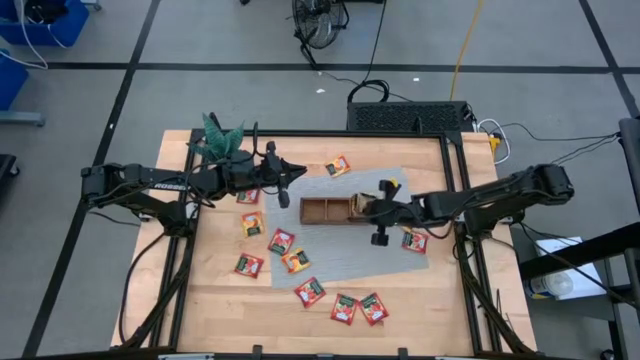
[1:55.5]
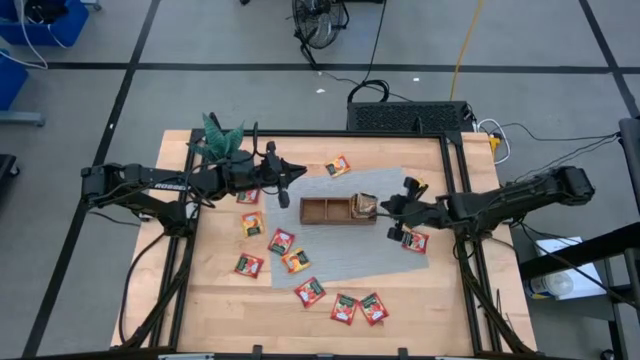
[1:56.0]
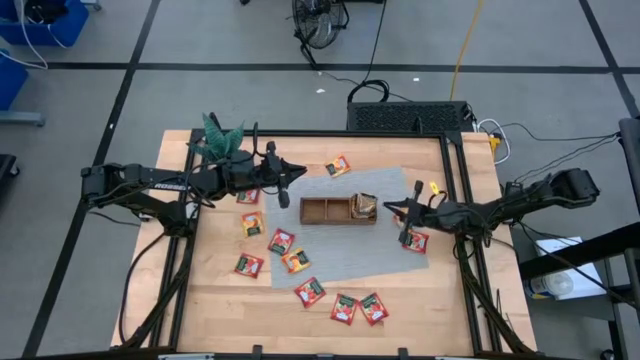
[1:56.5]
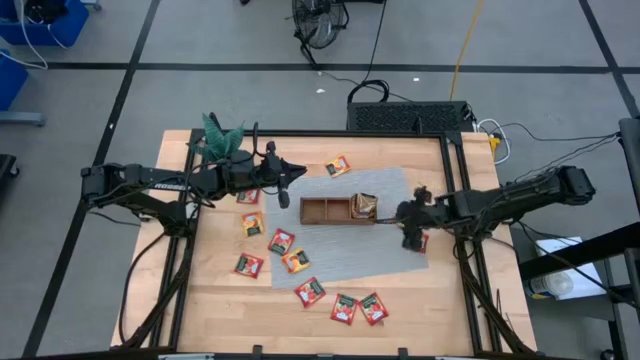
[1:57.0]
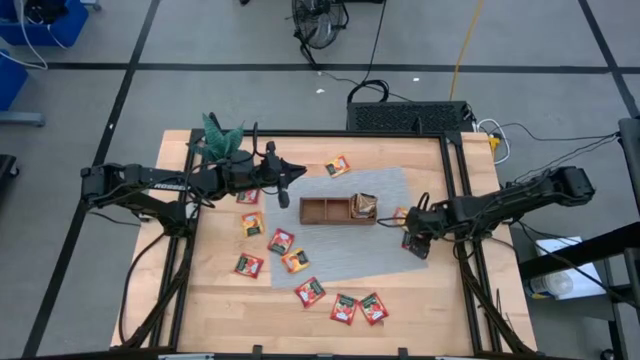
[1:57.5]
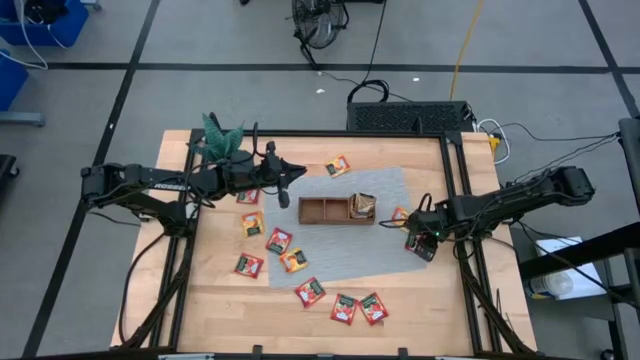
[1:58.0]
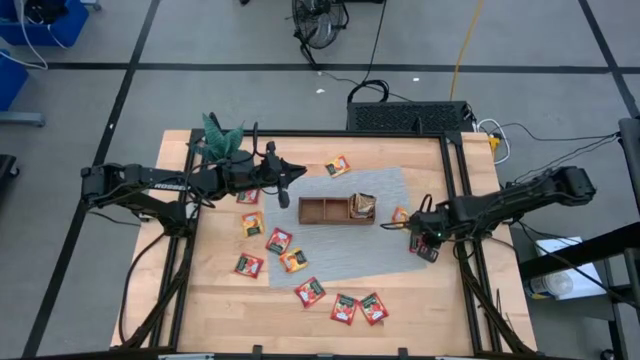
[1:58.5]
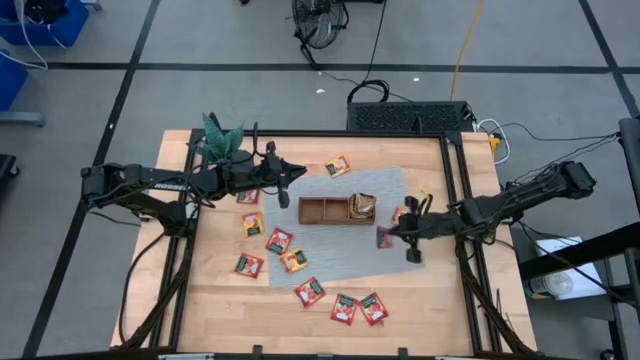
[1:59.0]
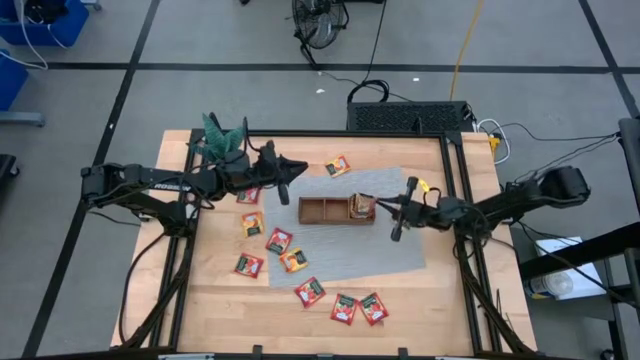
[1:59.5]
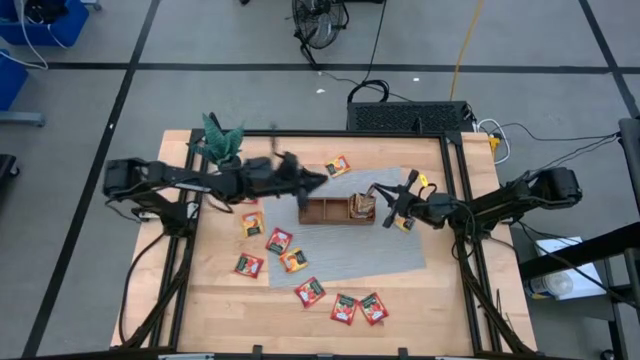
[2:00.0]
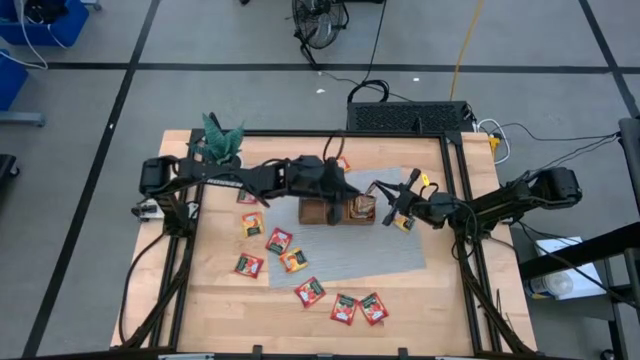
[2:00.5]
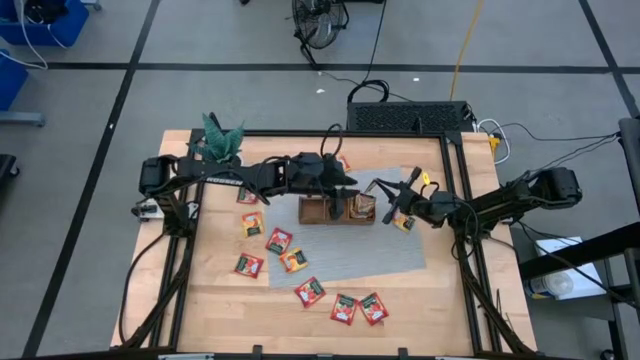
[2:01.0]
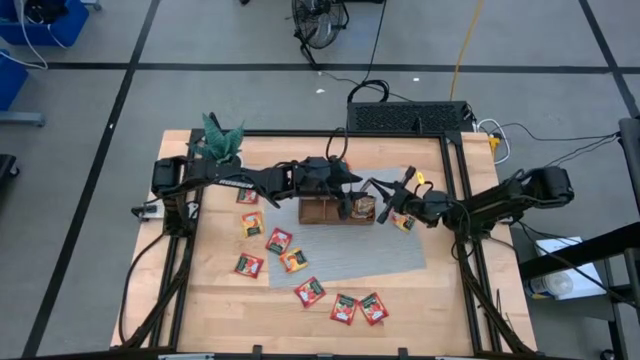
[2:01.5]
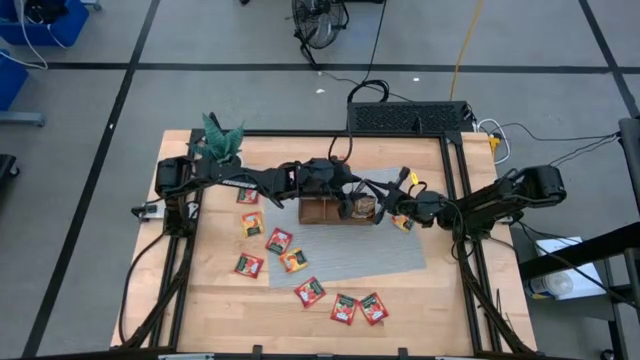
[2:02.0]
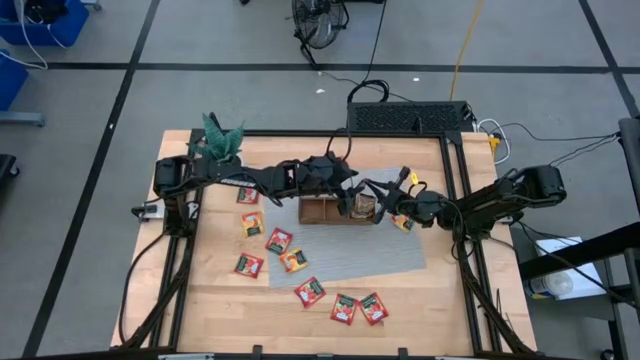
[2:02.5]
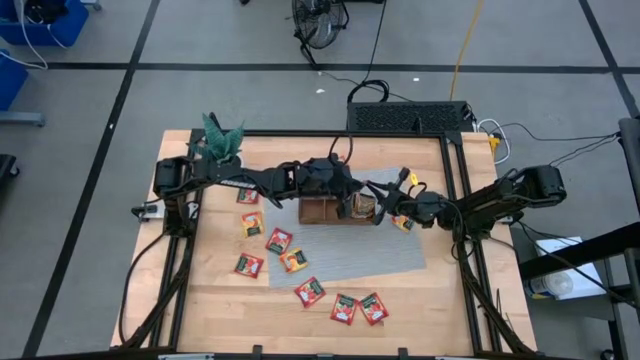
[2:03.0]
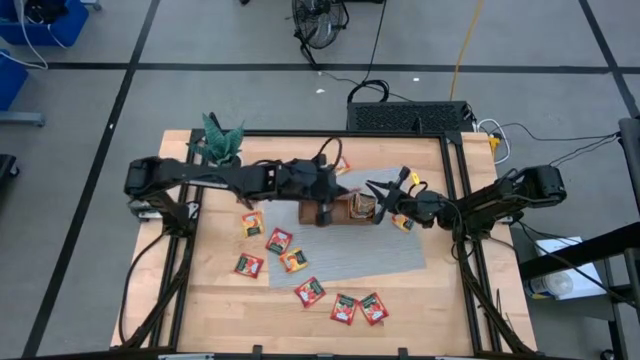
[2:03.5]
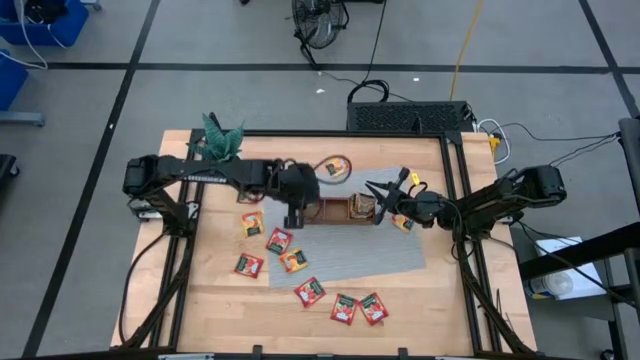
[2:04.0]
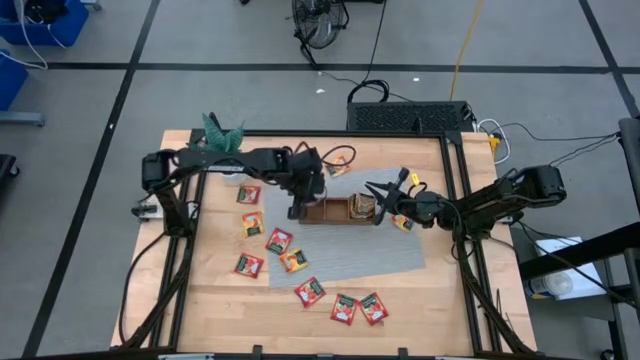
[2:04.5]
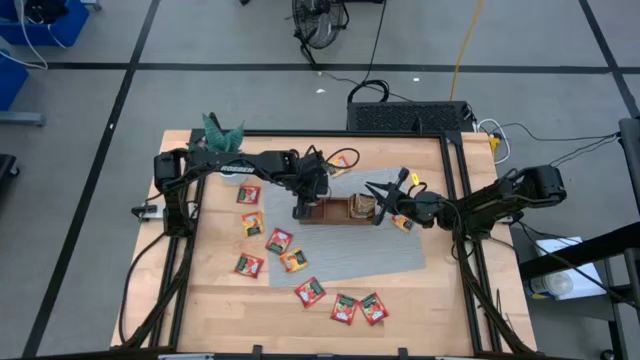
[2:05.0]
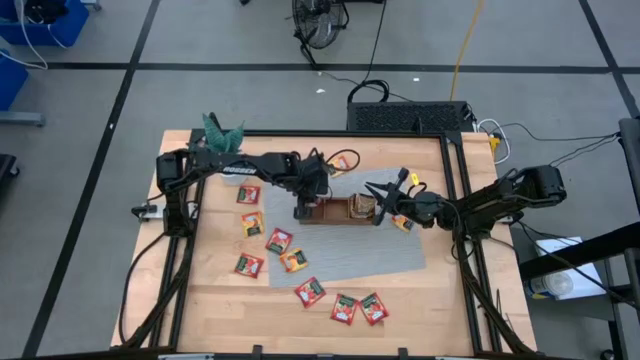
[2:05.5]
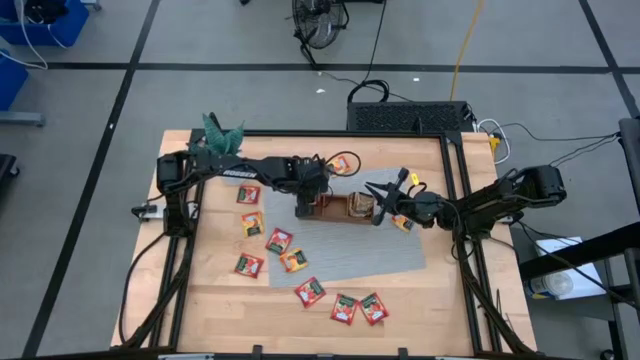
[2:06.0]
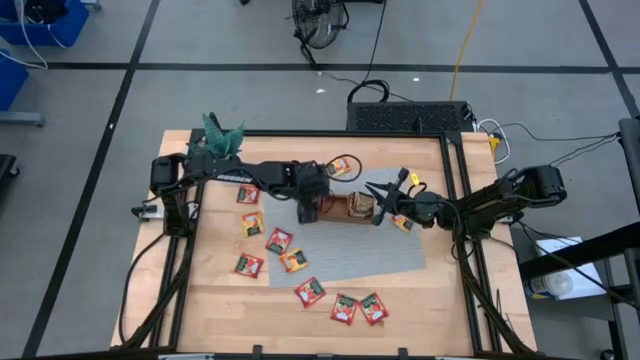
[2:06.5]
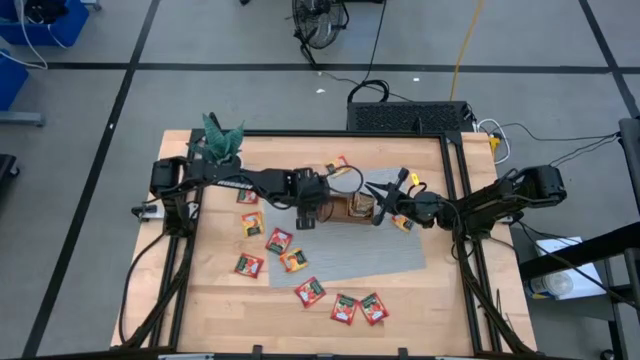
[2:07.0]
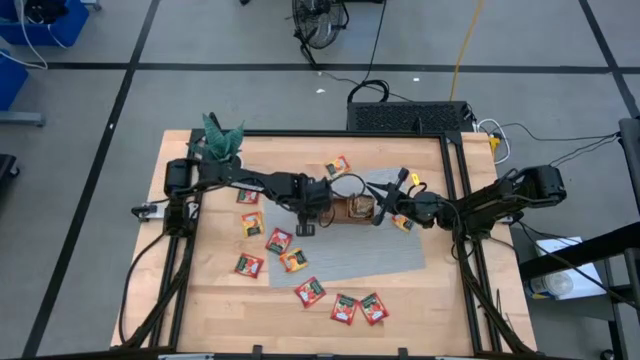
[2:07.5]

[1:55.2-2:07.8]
Task: Pick & Place Tea
Put the red tea into the left part of the wooden organizer

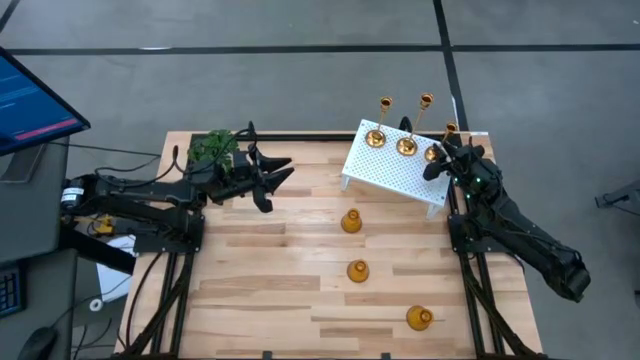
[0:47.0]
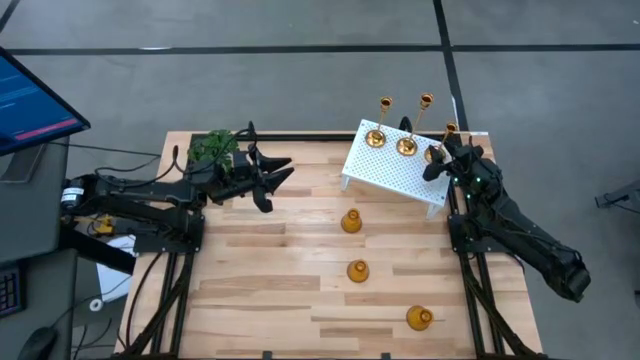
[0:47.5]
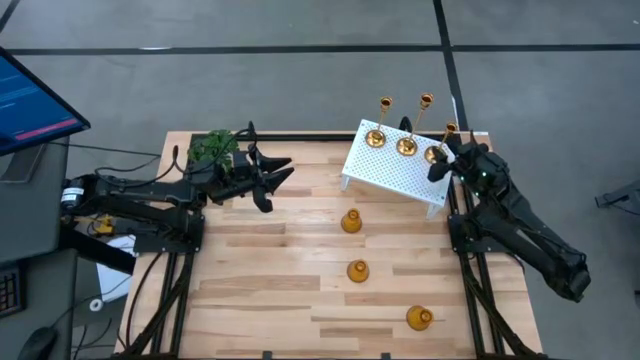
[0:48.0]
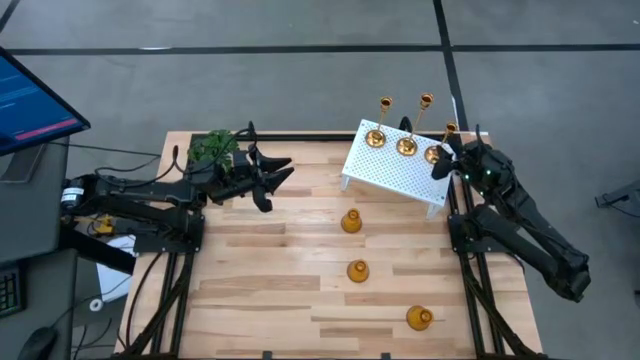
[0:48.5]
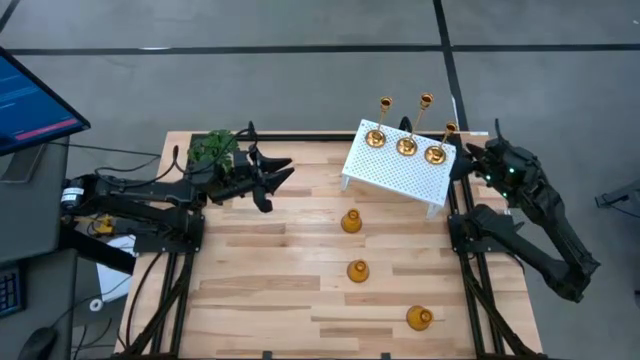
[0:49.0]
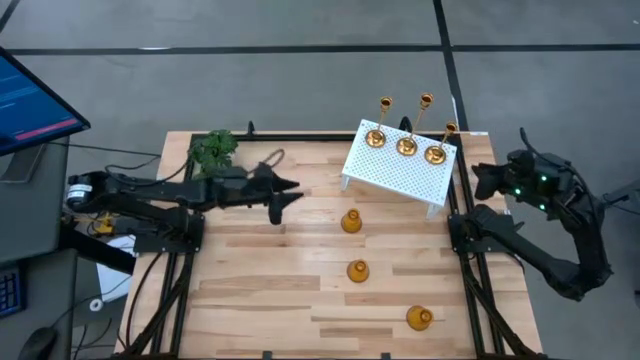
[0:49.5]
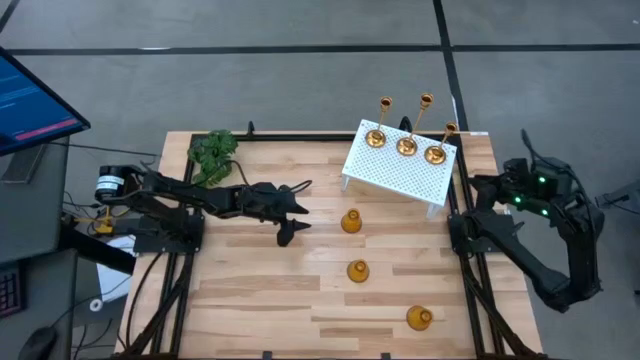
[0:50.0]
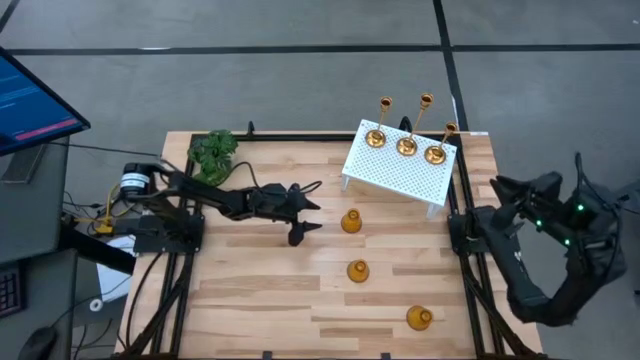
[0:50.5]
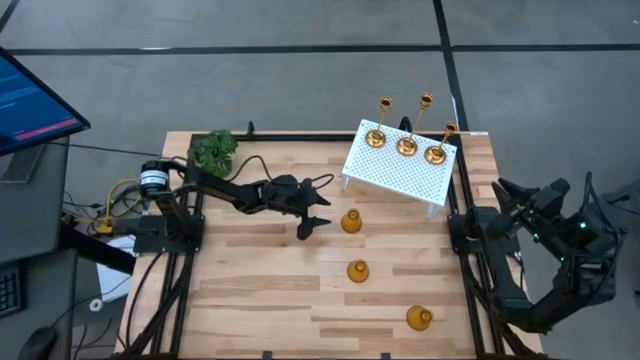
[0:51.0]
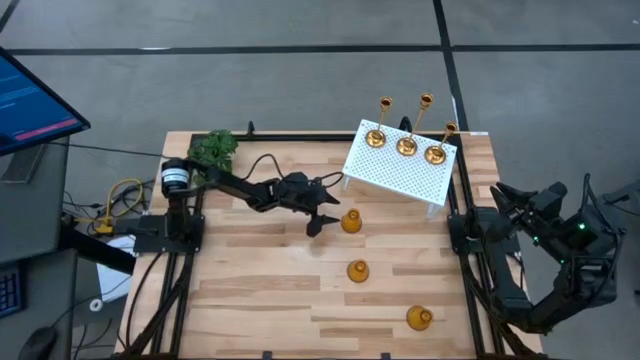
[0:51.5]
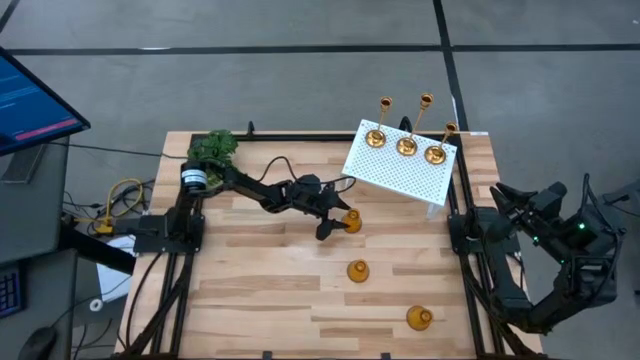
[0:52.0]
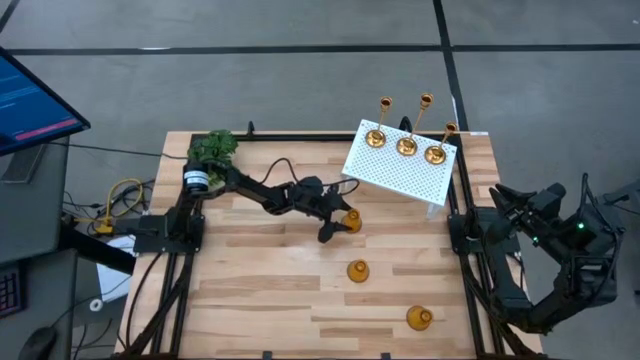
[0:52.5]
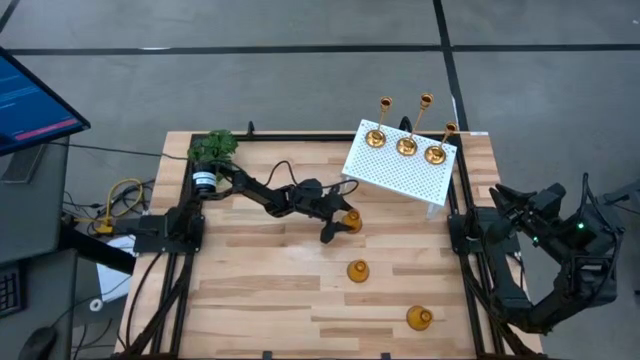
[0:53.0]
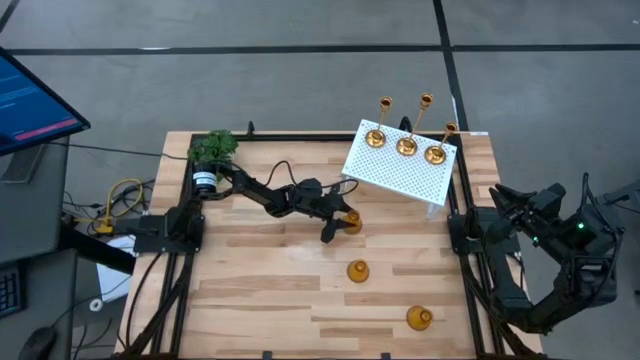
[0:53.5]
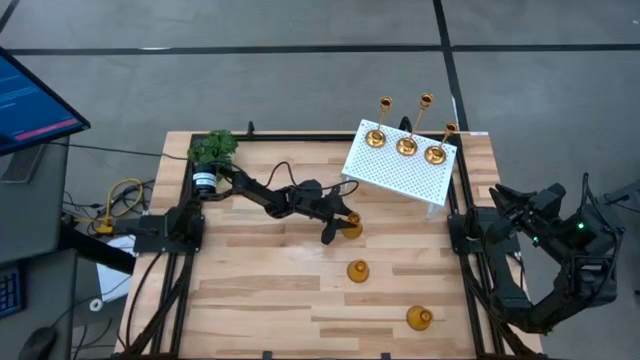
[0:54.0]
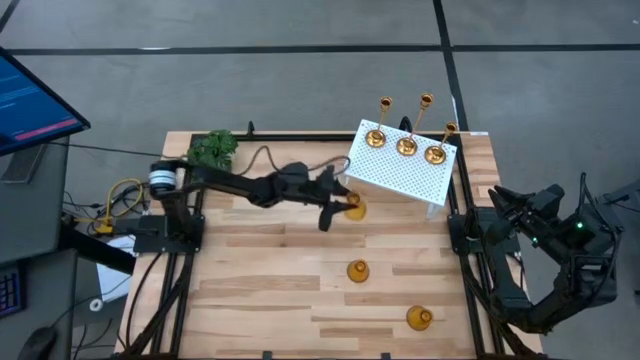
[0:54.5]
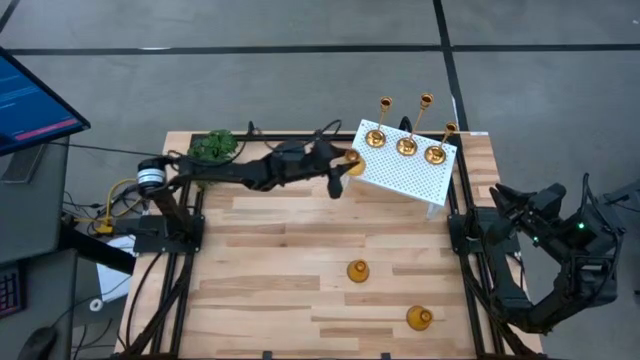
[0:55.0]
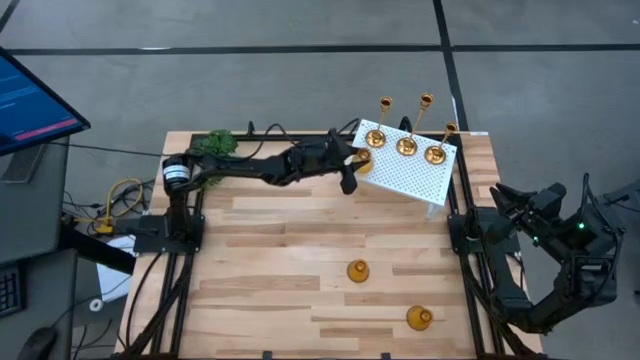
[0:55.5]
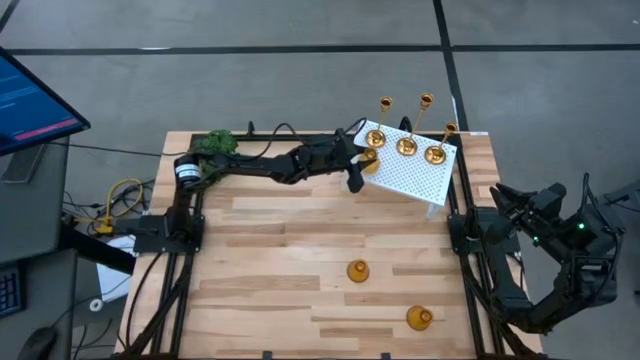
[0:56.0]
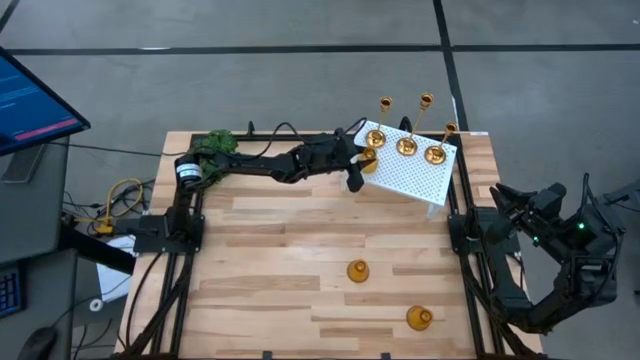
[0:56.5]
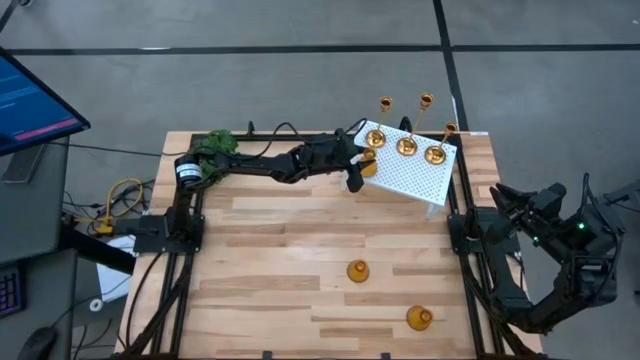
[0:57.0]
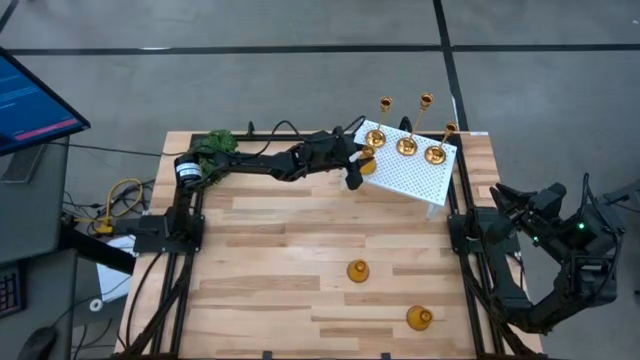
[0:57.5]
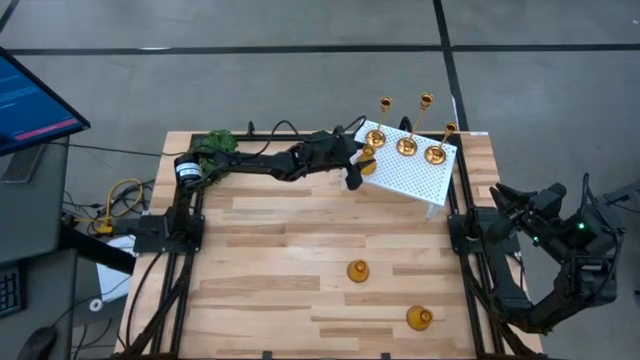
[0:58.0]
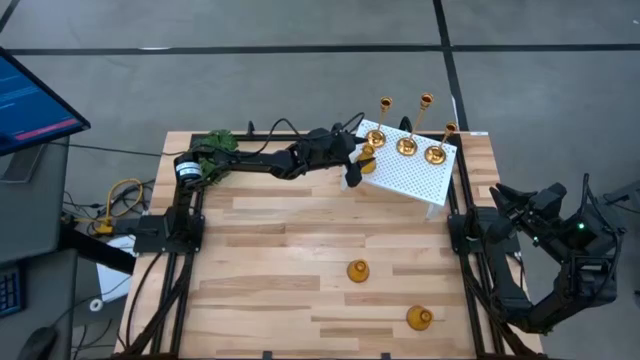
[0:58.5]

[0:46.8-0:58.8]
Task: Pick & Place candle stick holders
Put the top yellow candle holder on the shelf
